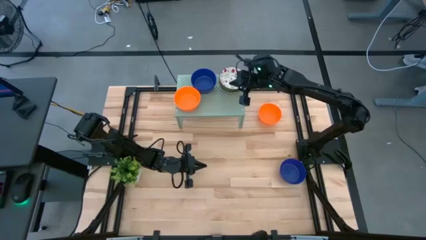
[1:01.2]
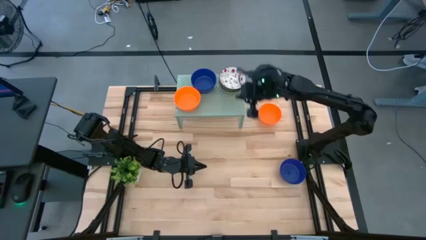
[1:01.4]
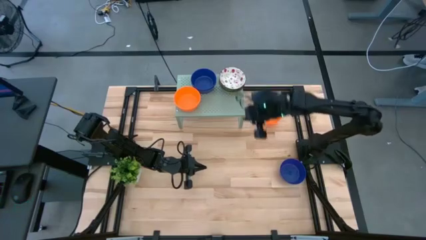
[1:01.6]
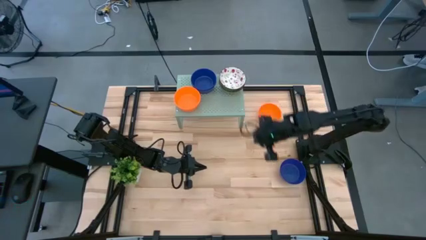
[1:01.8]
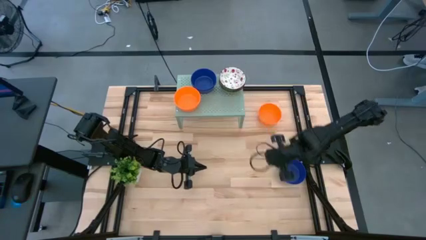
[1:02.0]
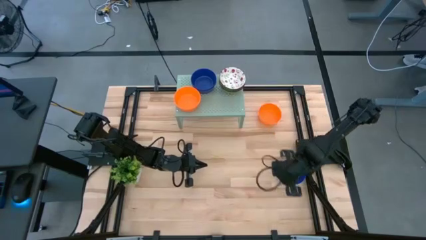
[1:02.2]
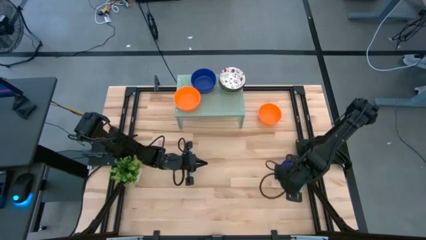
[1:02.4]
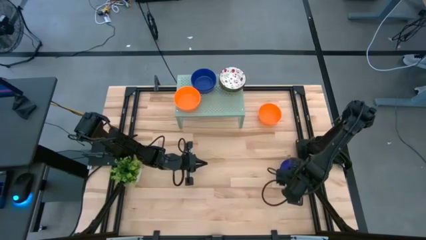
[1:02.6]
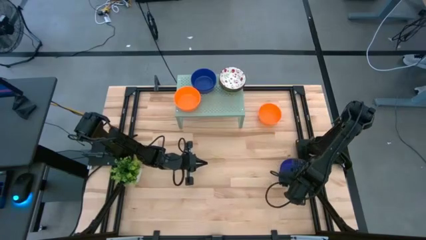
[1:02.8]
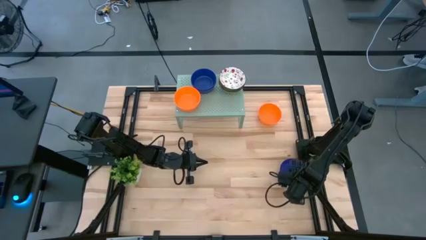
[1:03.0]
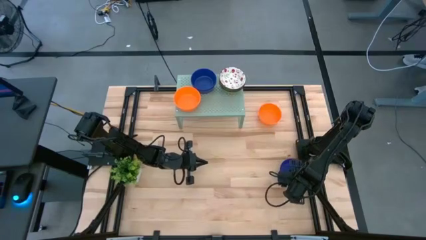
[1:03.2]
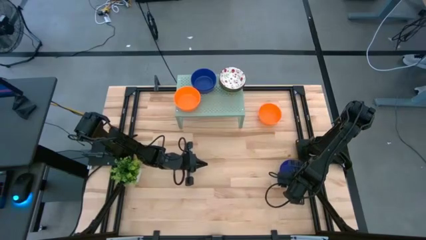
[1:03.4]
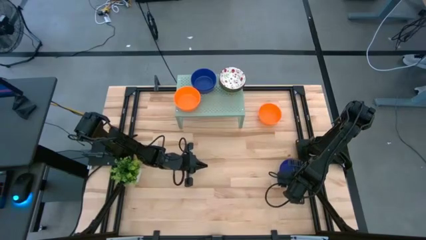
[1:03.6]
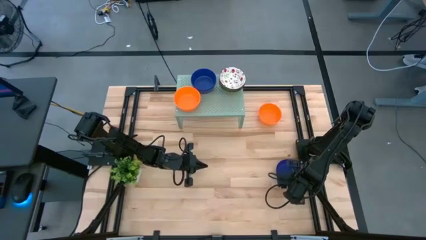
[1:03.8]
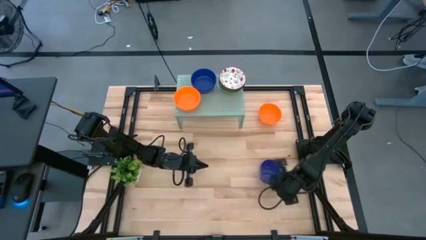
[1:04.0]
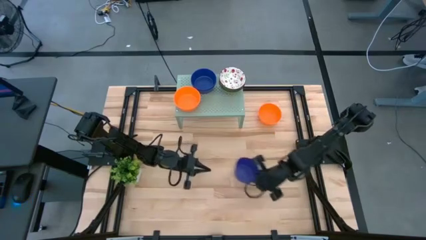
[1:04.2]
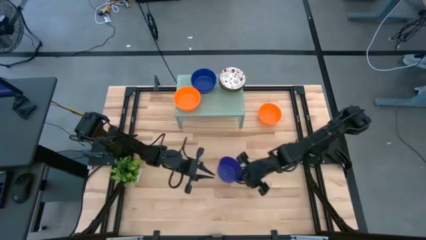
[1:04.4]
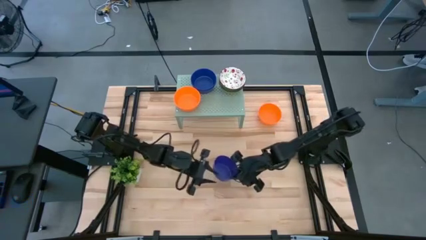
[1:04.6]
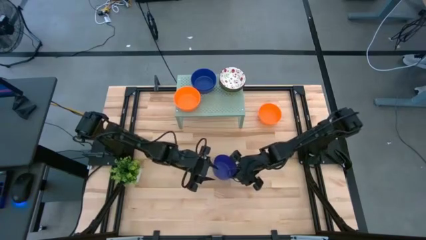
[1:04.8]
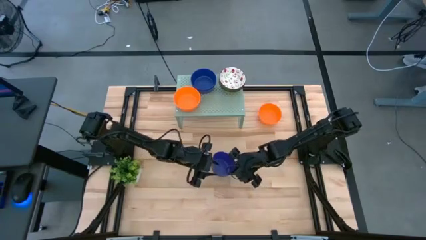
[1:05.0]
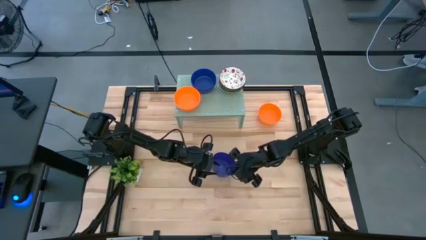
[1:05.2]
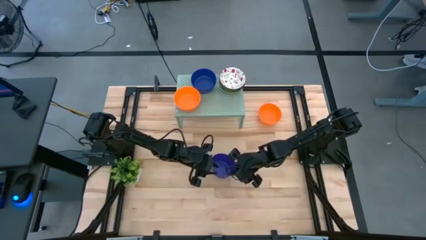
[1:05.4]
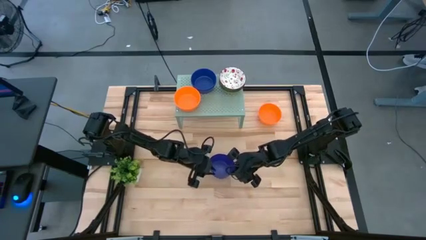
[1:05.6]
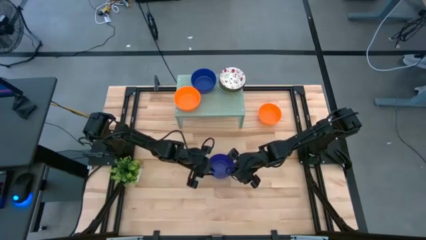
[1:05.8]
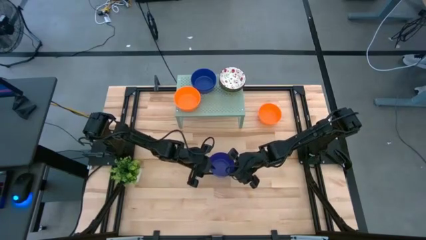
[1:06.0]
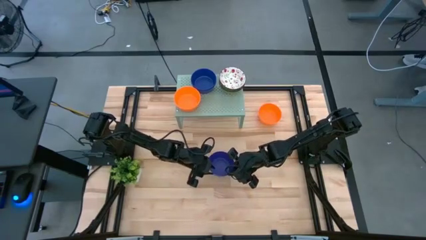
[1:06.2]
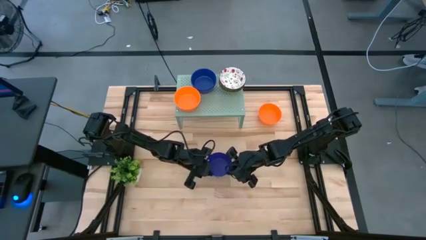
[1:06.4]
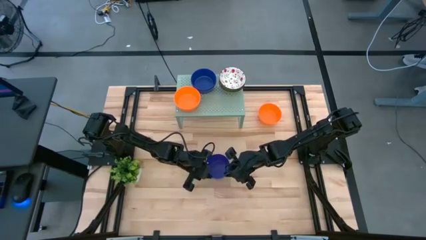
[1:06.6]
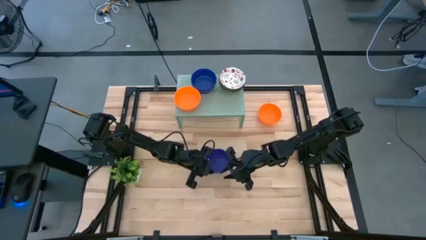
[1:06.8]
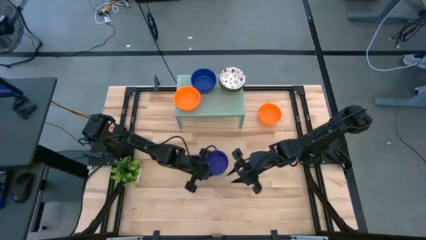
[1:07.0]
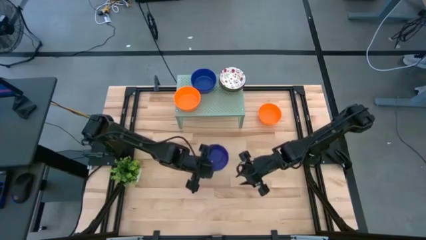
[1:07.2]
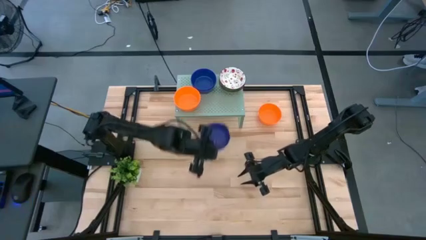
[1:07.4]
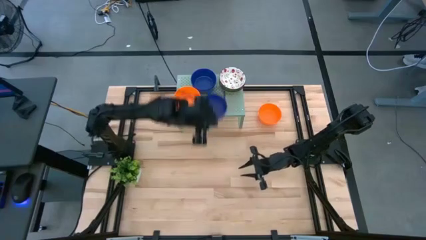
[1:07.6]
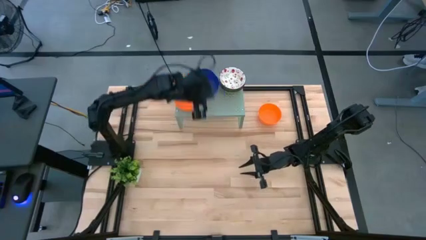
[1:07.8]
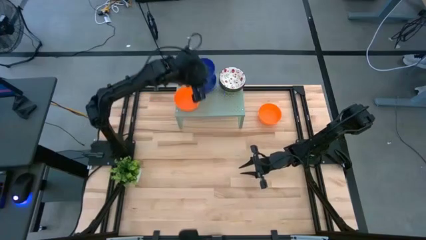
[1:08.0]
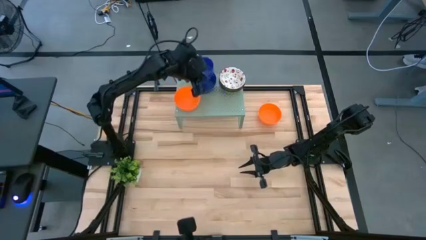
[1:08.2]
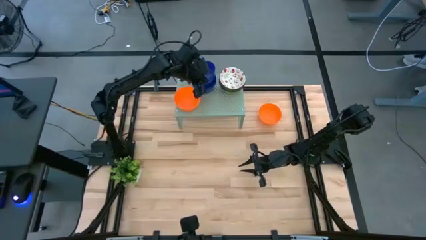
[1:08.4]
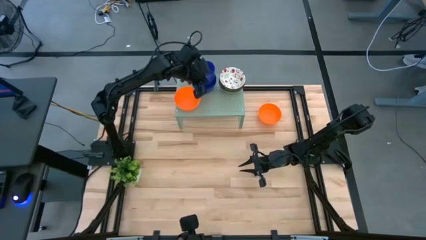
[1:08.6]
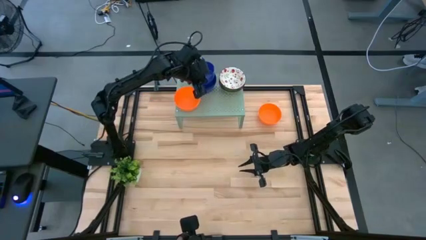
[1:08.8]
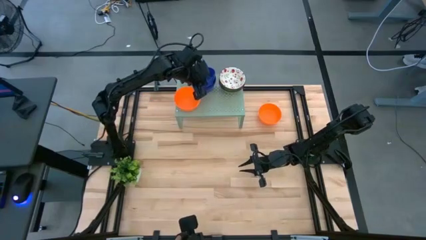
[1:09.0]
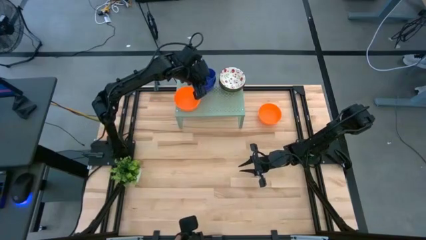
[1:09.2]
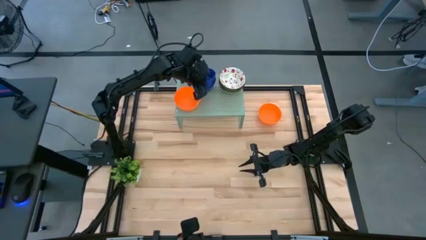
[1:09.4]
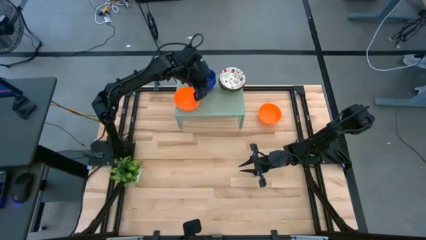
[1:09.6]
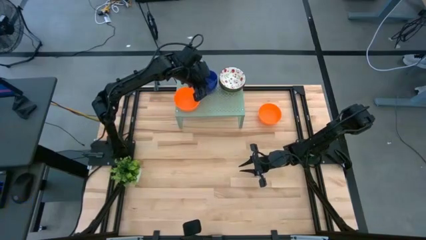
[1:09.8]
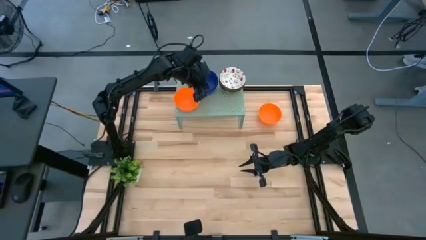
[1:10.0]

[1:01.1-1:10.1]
Task: Pick & Place Mini bowls
Stack the blue bowl on the blue bowls on the shelf

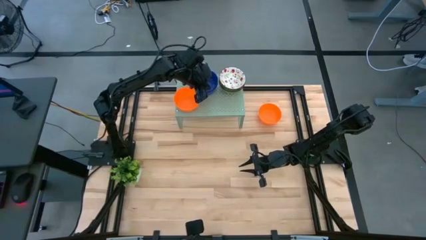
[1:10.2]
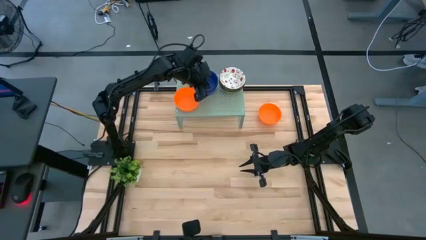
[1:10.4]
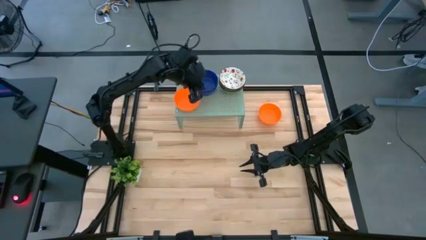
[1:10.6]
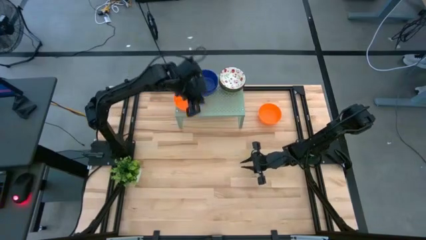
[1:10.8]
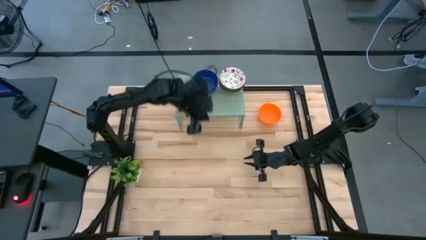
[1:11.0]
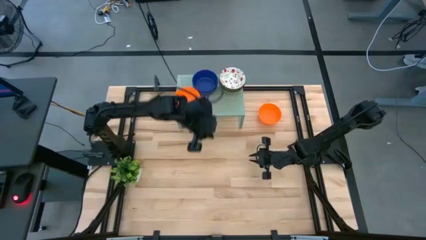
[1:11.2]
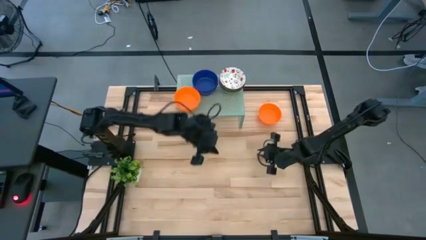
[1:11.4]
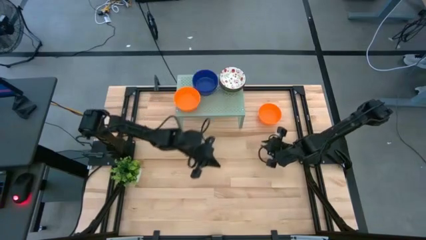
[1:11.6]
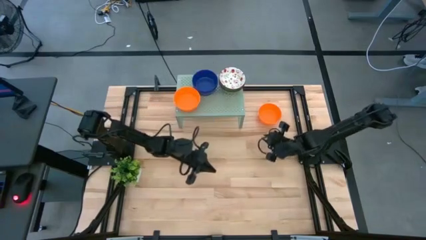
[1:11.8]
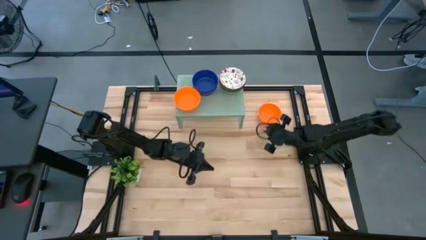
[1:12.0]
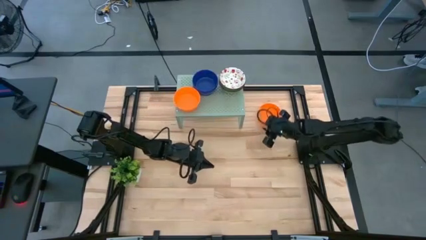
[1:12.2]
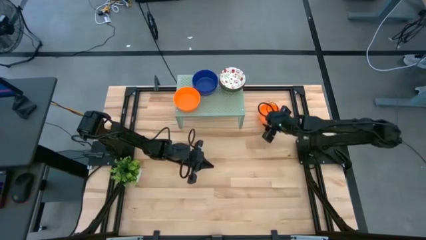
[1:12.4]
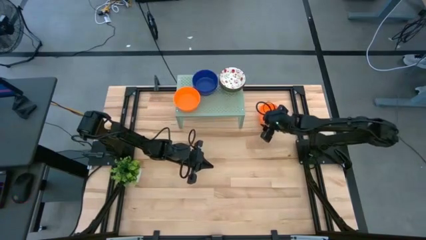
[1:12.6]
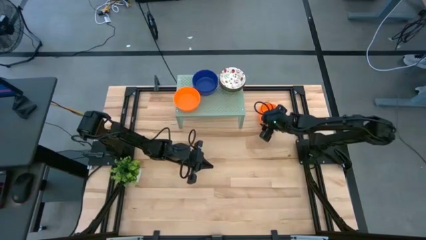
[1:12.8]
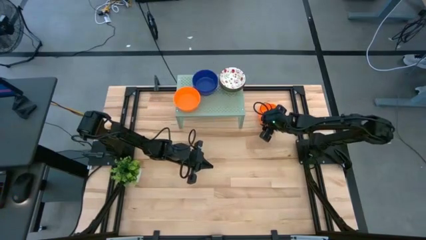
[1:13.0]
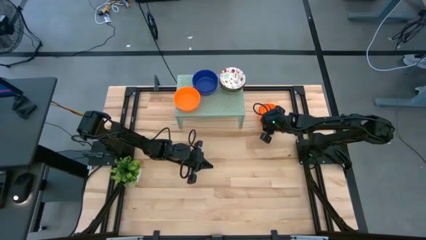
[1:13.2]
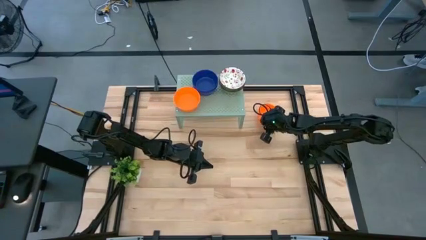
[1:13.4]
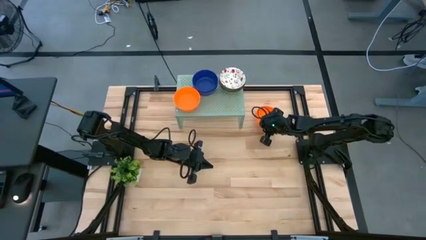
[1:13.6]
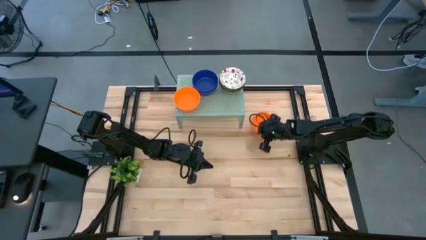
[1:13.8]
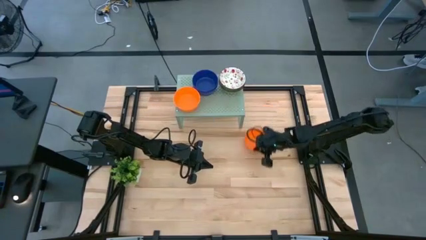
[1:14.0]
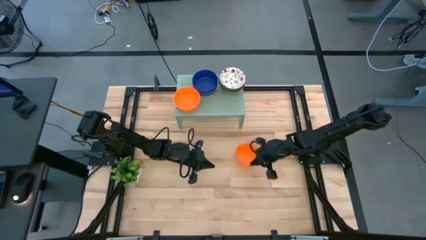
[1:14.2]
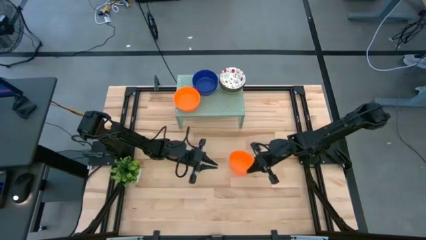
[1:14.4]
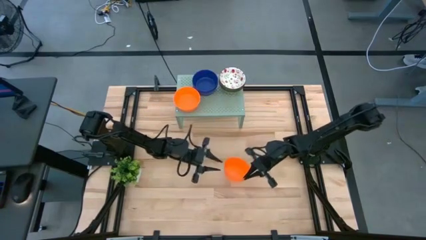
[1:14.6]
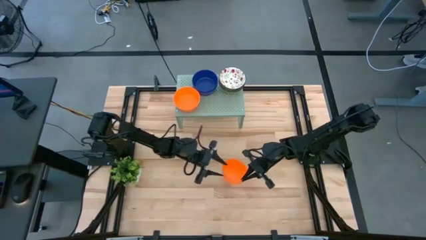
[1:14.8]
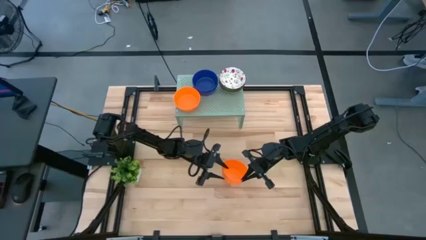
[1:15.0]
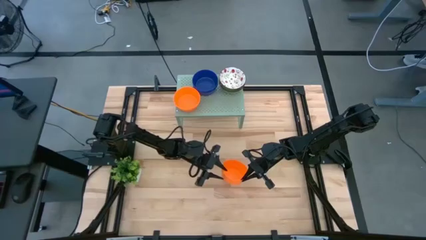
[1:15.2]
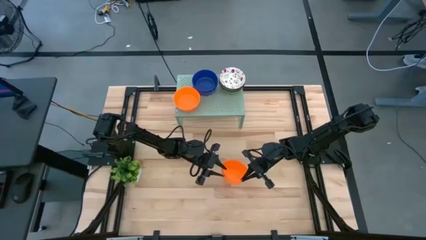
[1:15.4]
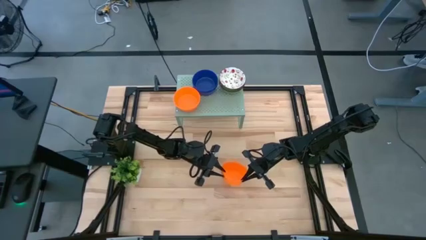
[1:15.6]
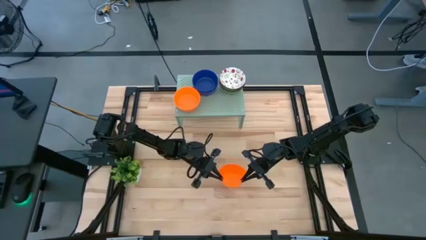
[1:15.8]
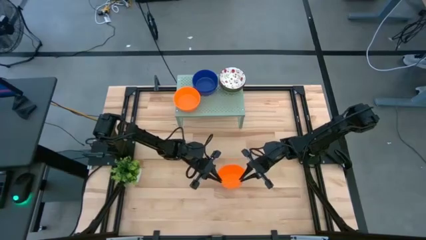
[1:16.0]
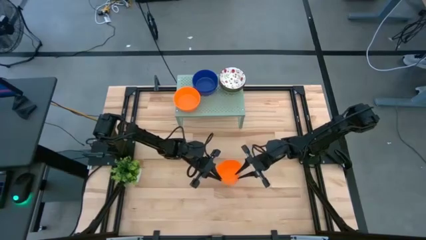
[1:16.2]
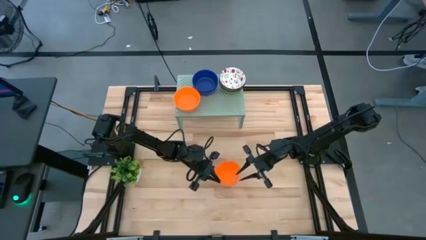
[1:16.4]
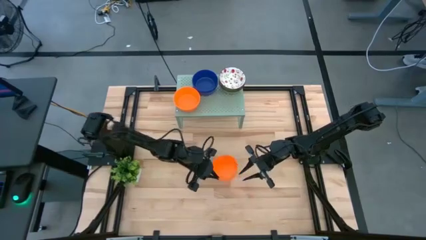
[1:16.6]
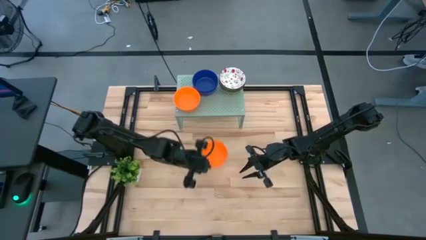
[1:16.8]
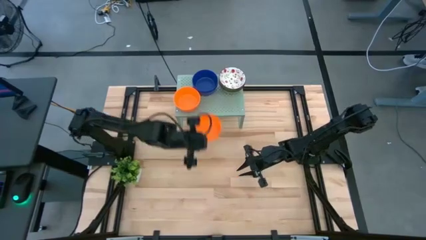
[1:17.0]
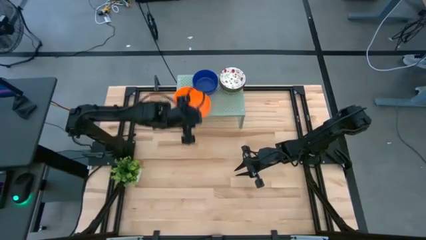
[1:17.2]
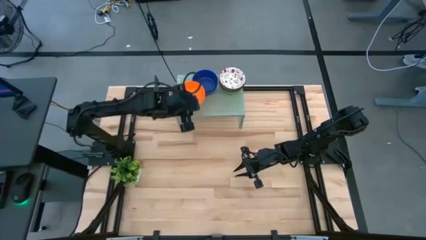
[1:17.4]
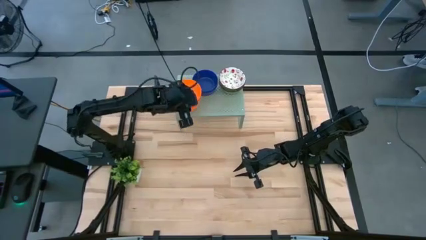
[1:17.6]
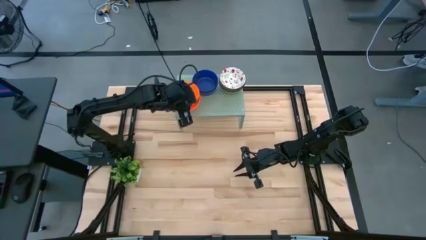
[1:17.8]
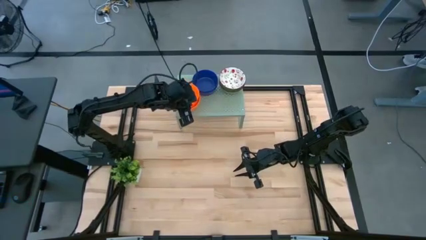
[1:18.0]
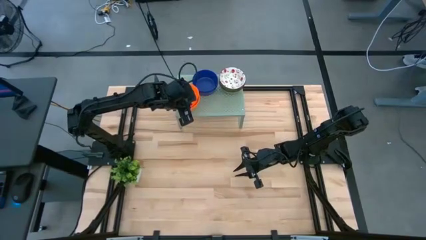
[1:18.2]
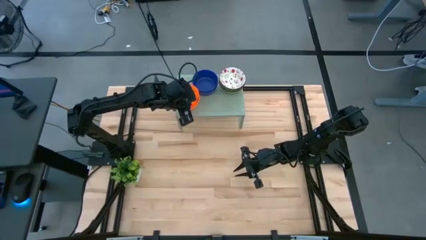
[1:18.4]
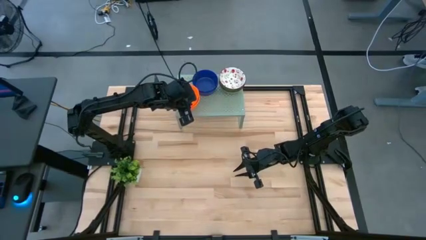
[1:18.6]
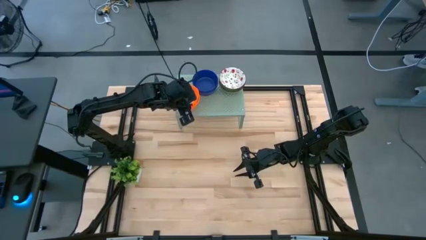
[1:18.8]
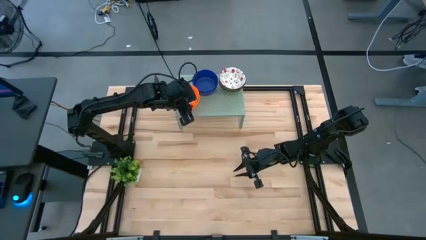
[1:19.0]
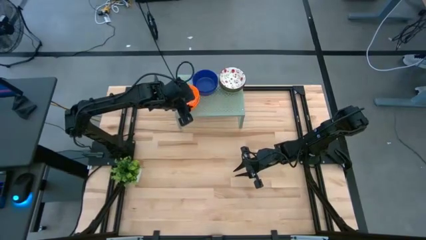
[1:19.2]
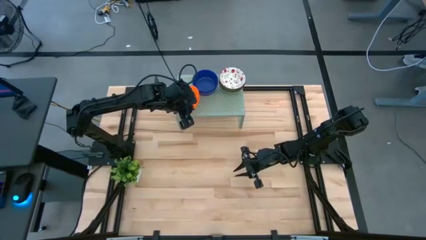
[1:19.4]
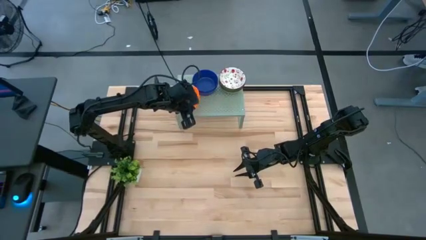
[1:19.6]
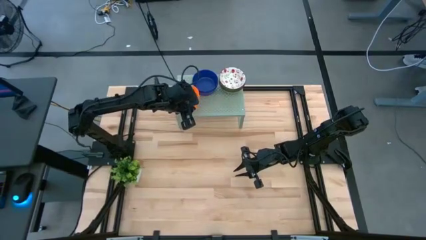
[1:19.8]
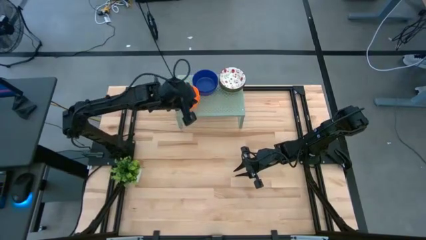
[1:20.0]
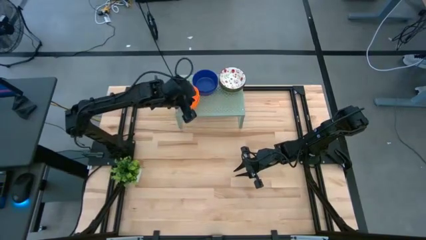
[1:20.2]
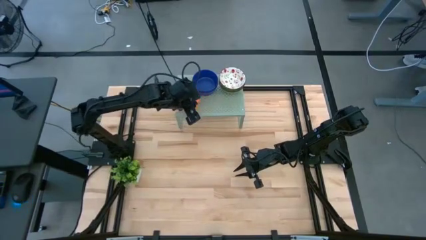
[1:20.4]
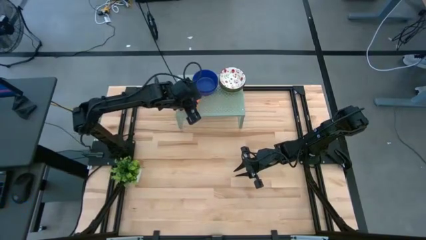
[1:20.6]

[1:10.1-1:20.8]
Stack the orange bowl on the orange bowls on the shelf
